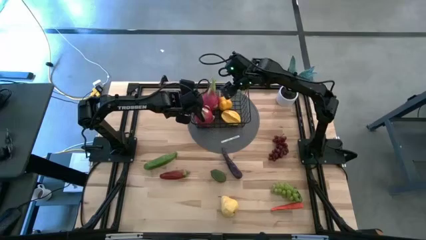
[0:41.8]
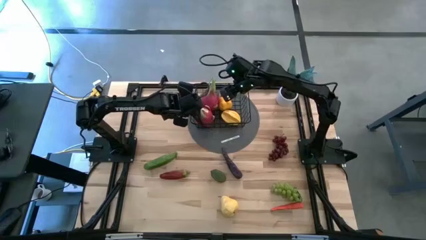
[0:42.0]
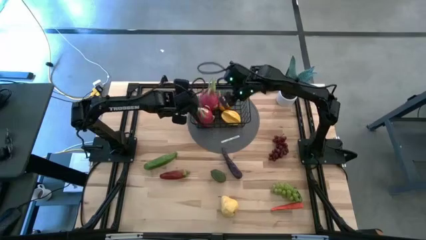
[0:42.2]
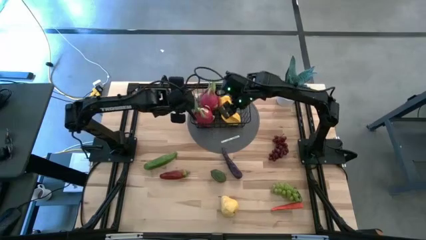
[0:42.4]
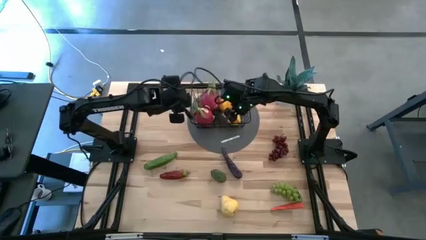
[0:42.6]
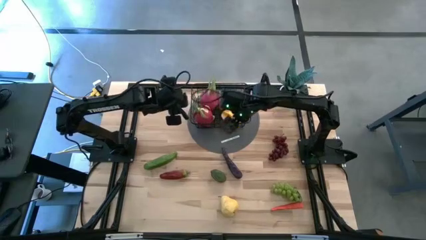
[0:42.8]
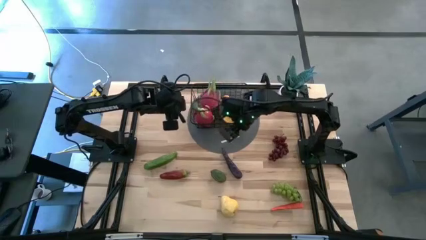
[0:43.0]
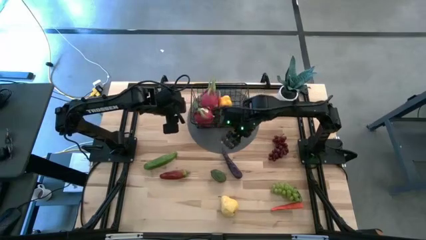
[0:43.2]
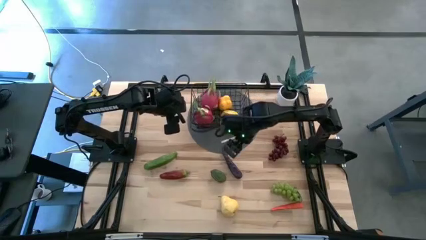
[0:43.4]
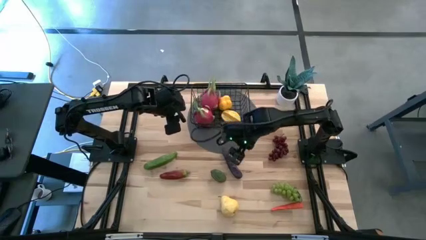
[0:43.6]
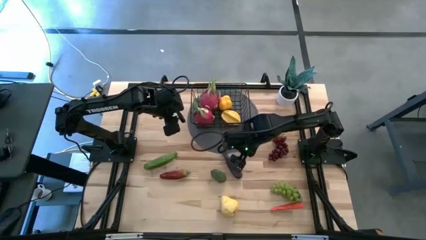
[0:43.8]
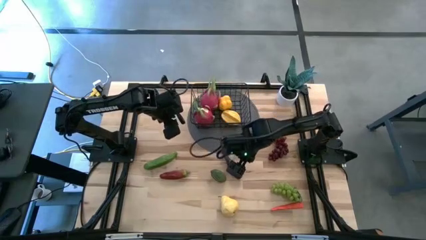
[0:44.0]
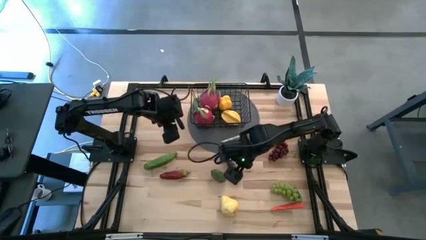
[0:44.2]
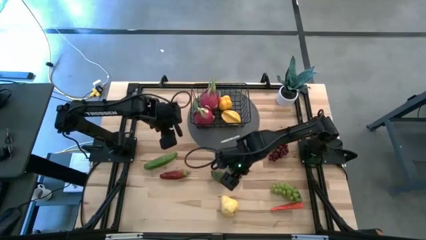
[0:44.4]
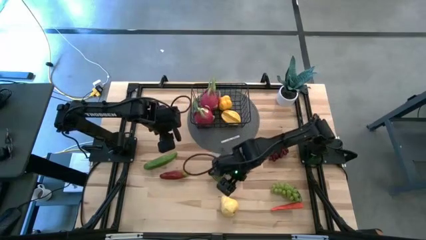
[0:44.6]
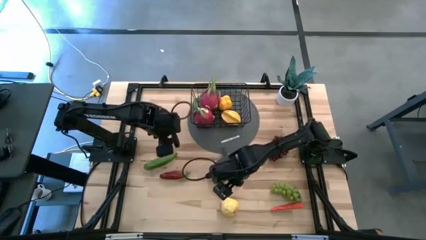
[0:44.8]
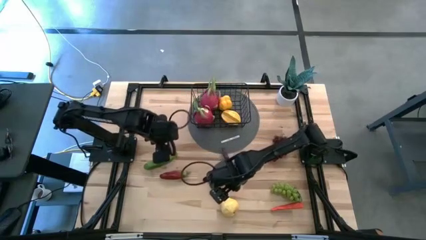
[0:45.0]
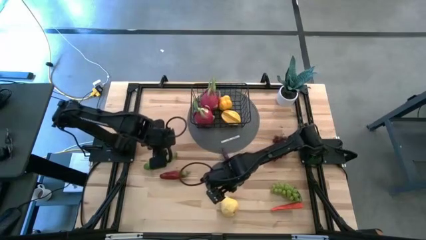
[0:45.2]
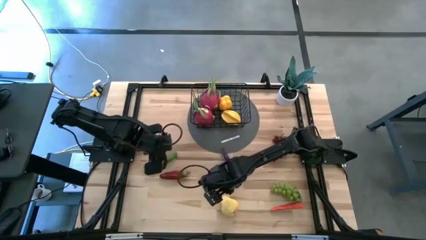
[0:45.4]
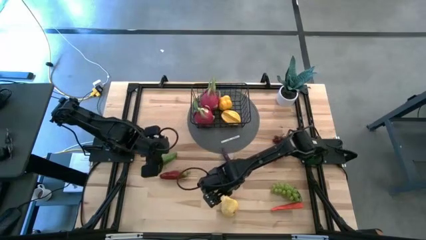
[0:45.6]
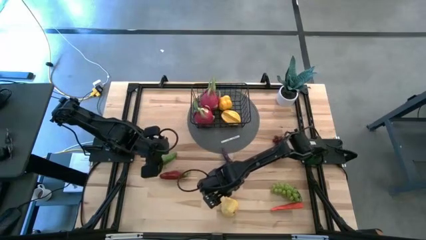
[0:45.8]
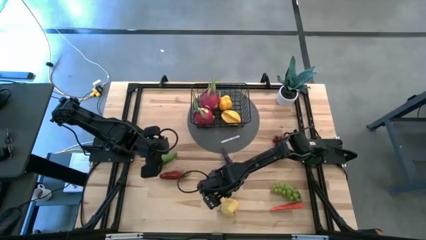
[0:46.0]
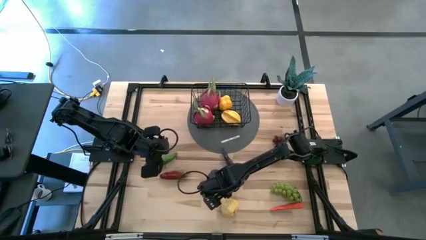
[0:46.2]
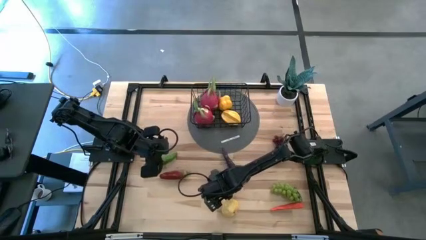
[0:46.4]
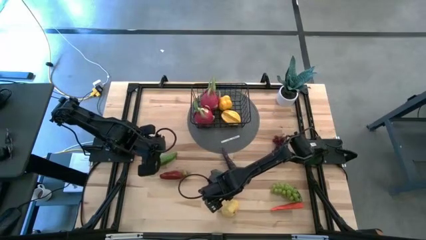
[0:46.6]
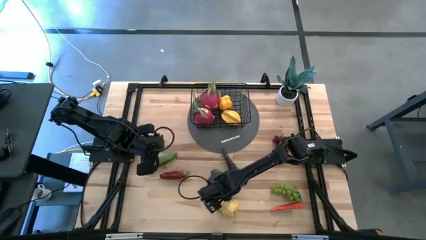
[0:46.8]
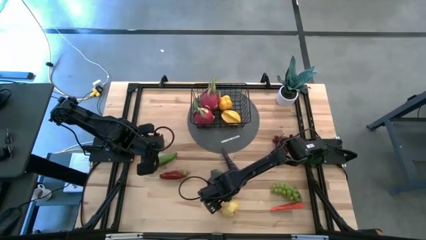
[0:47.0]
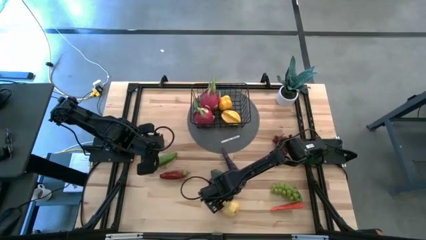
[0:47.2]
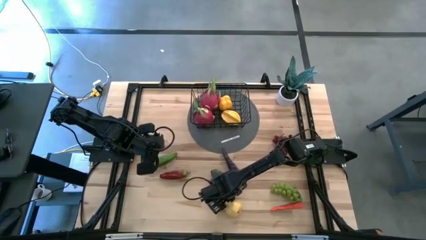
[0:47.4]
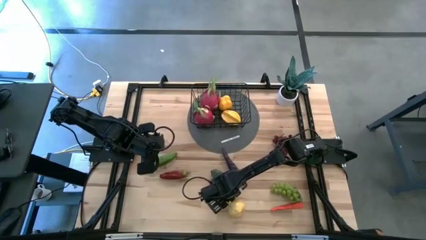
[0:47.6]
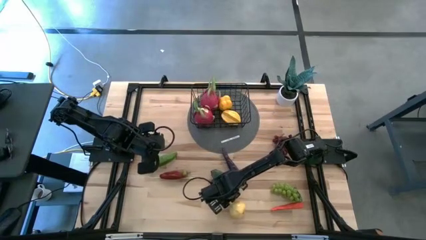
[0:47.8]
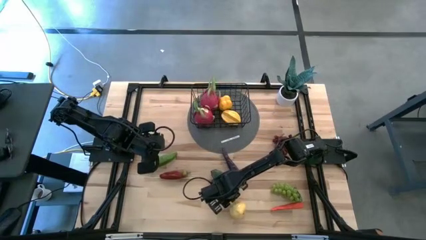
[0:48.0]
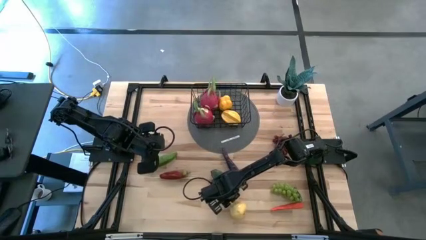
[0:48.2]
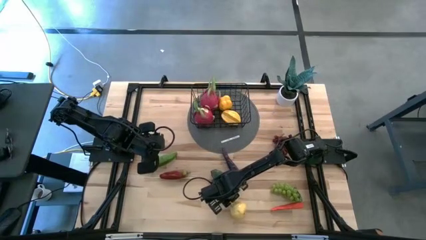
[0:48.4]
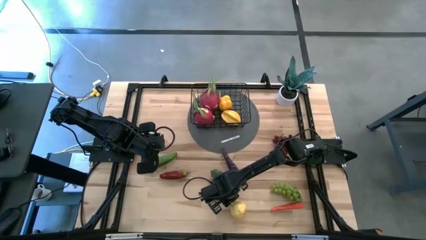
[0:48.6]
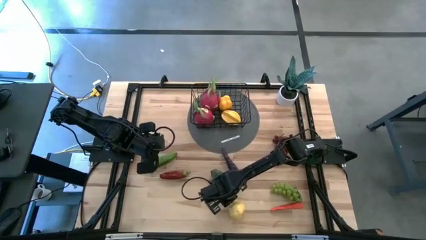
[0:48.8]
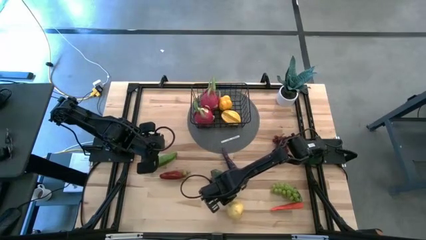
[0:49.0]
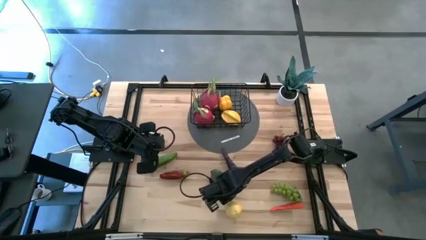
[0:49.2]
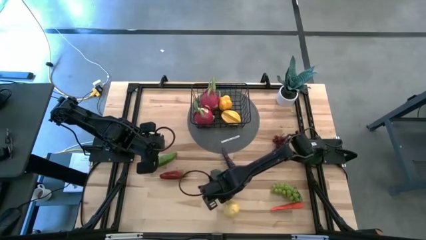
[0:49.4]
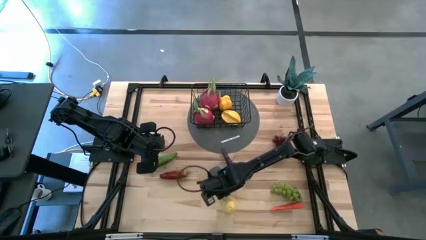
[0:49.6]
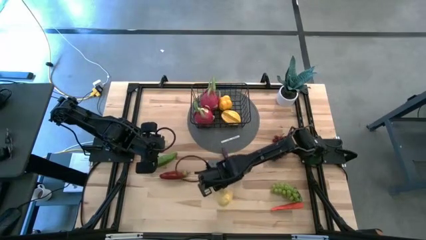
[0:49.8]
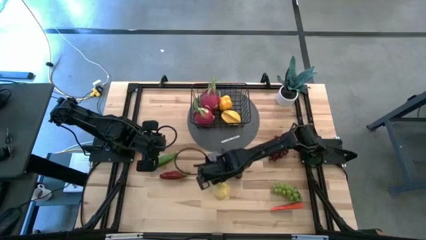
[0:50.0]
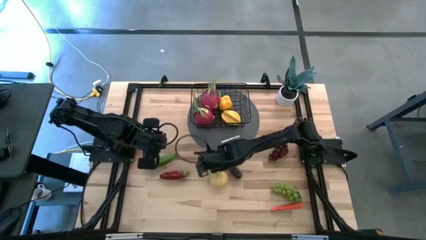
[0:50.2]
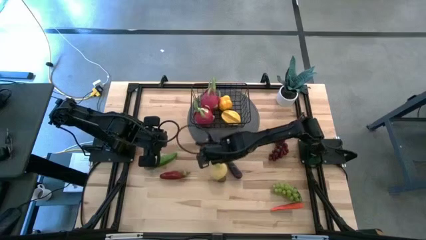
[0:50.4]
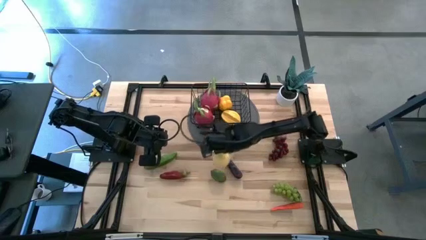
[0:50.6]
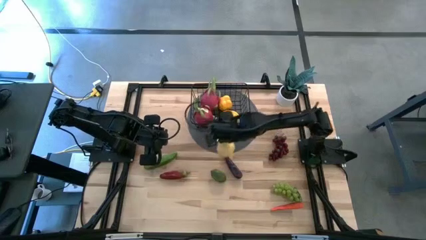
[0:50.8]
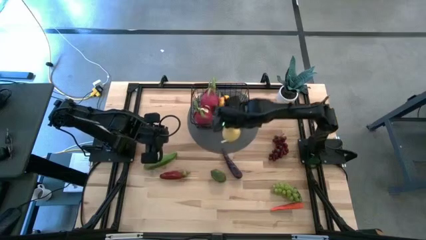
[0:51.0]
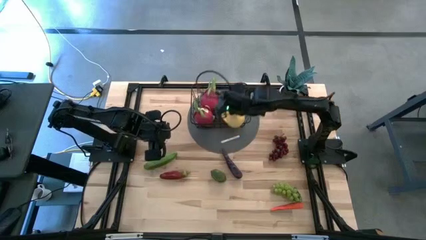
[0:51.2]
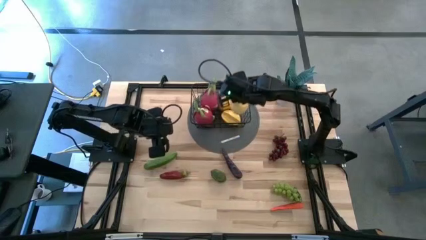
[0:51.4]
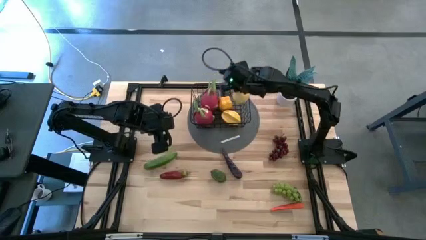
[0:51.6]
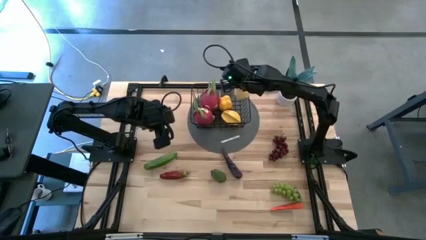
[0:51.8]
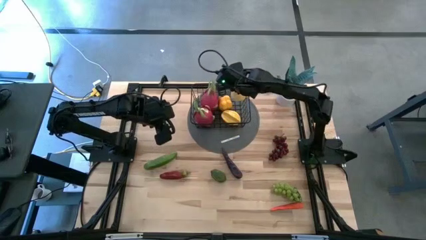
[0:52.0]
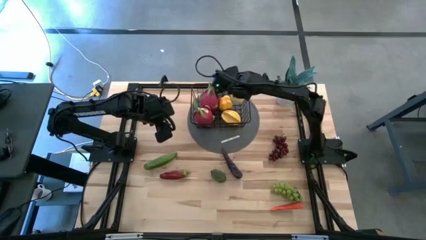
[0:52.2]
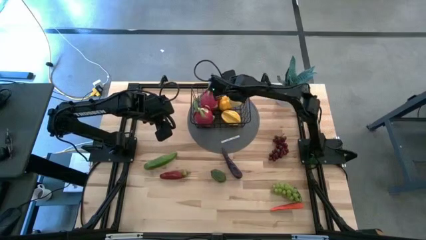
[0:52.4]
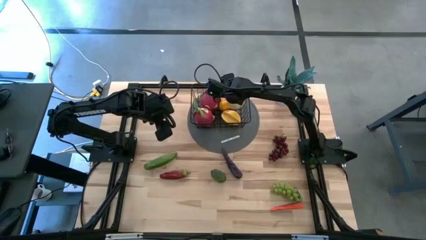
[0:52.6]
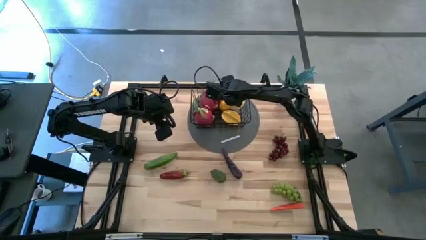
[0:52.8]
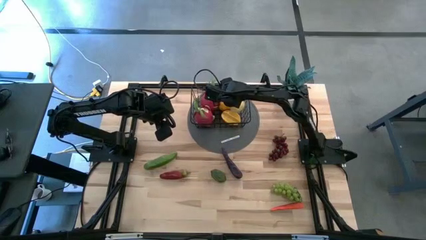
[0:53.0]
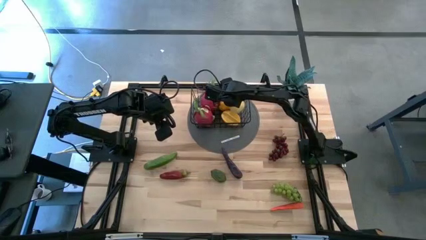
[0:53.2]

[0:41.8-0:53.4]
Task: Build produce basket
Put the yellow pear into the black wire basket
